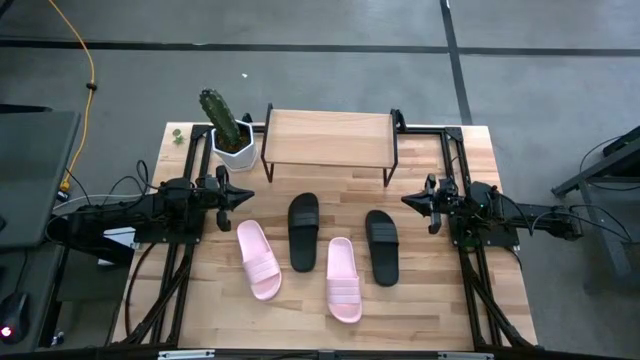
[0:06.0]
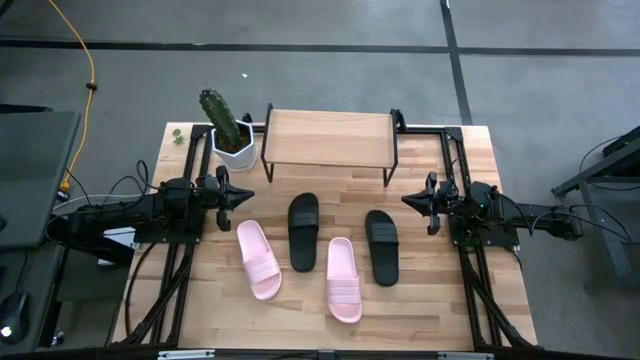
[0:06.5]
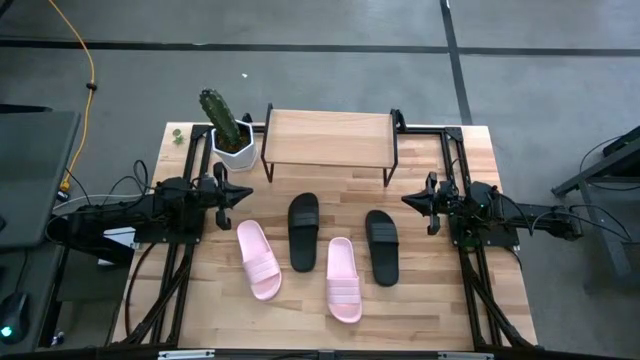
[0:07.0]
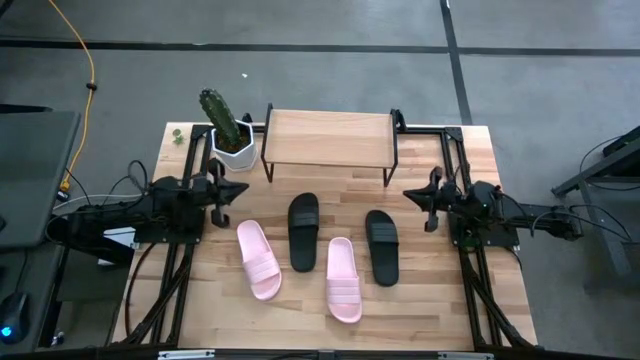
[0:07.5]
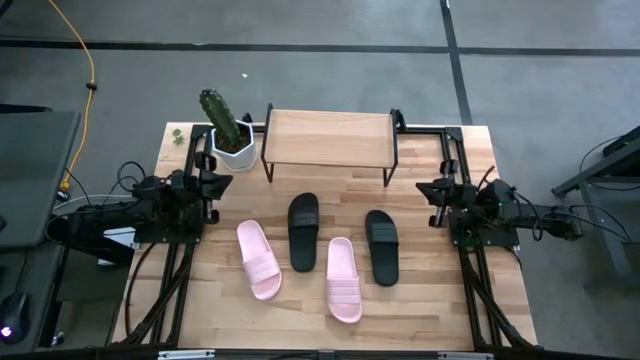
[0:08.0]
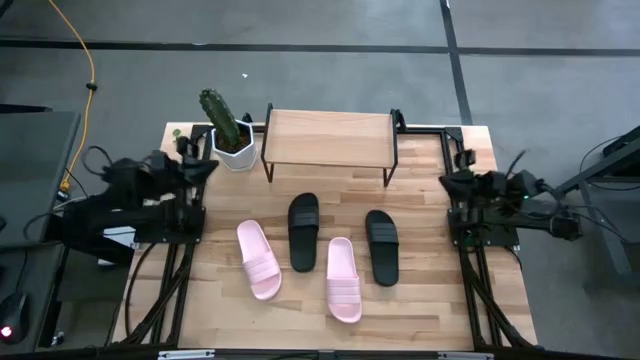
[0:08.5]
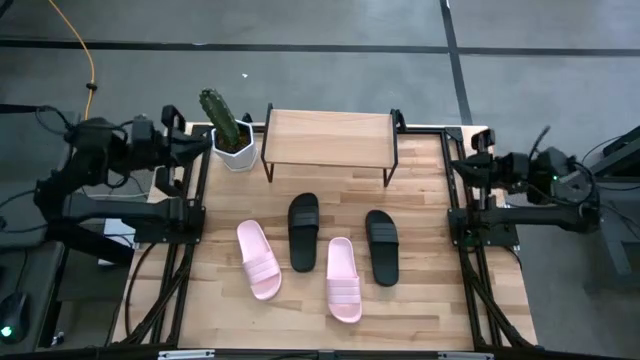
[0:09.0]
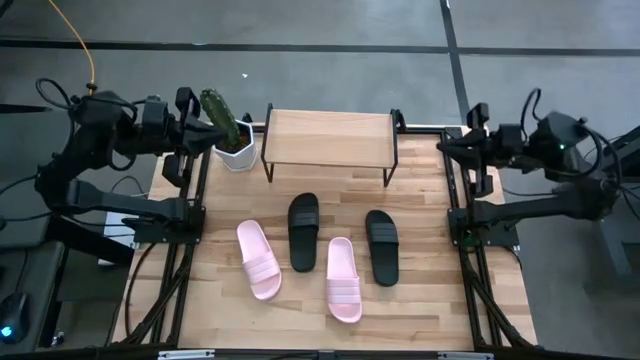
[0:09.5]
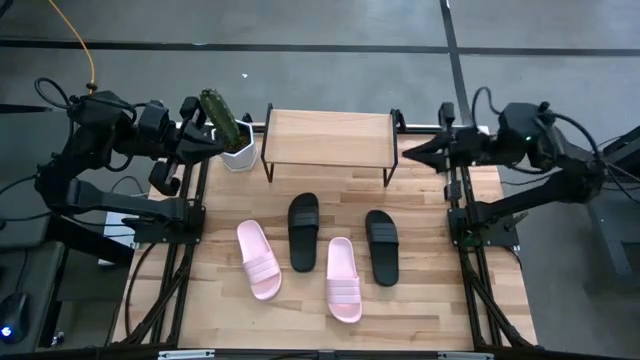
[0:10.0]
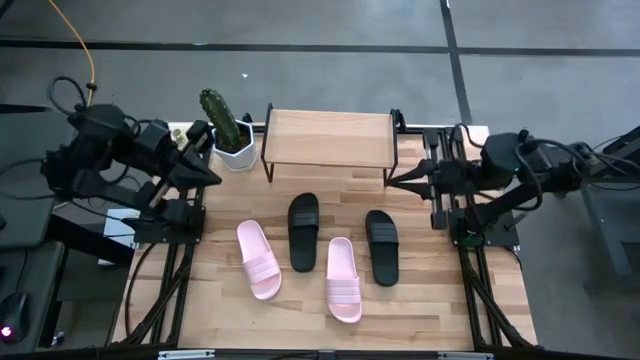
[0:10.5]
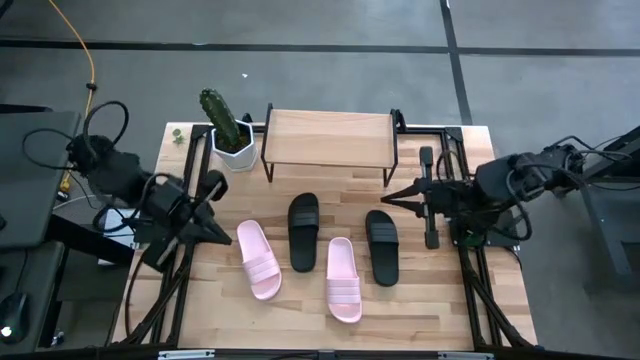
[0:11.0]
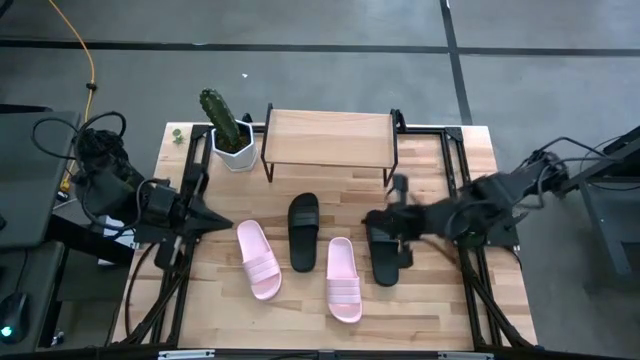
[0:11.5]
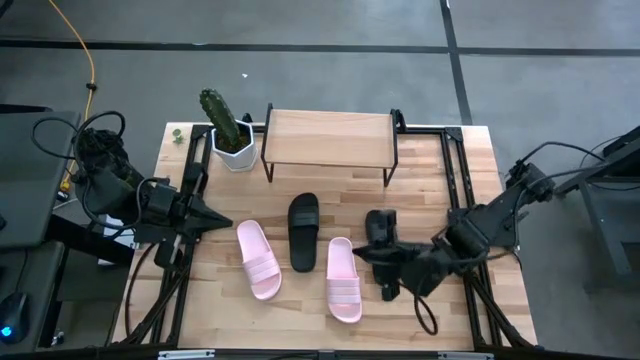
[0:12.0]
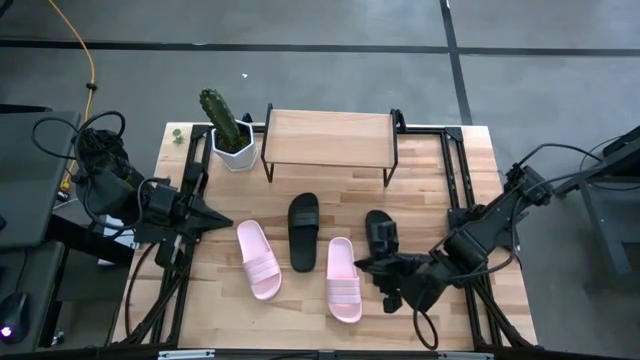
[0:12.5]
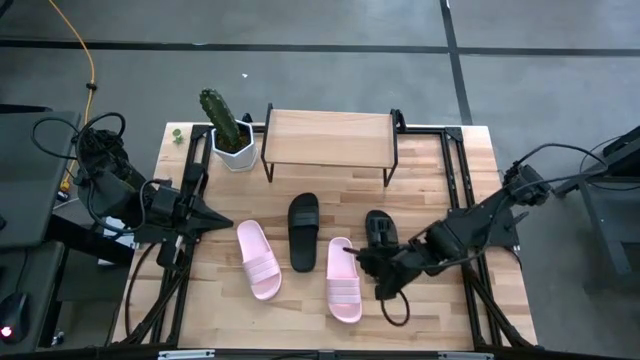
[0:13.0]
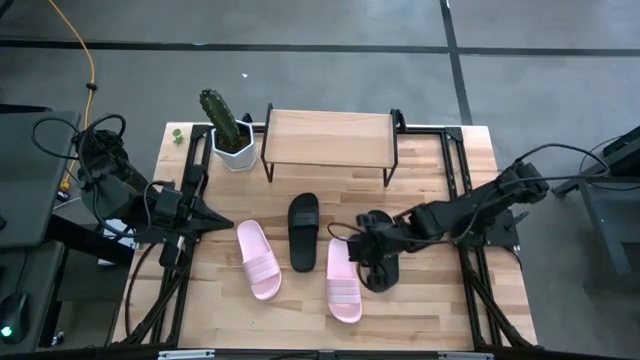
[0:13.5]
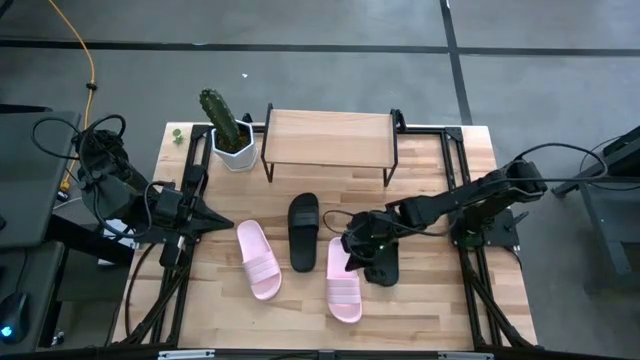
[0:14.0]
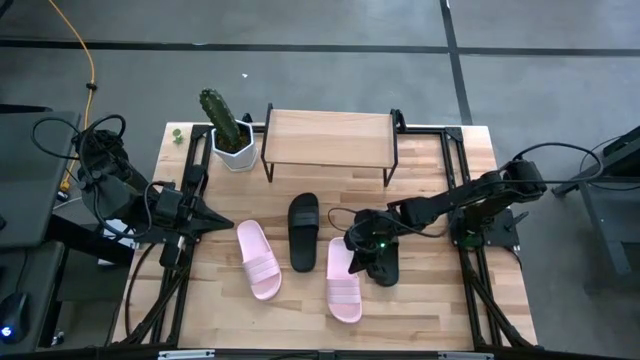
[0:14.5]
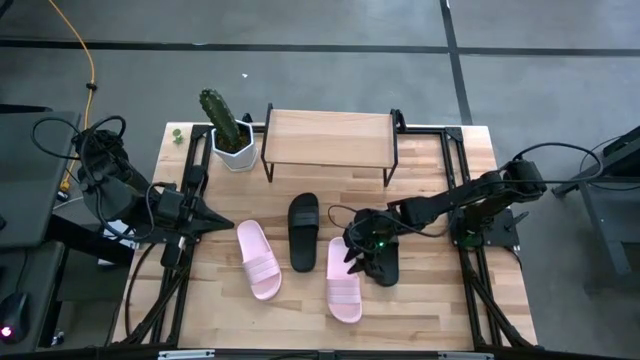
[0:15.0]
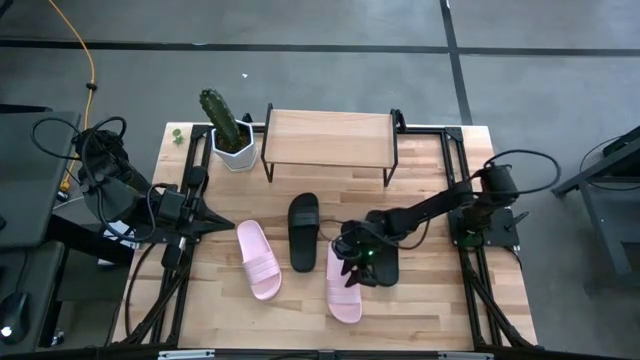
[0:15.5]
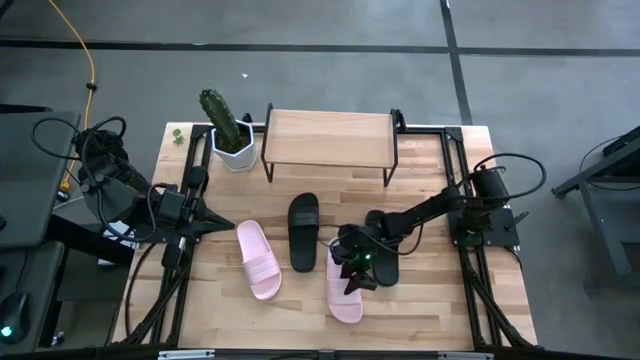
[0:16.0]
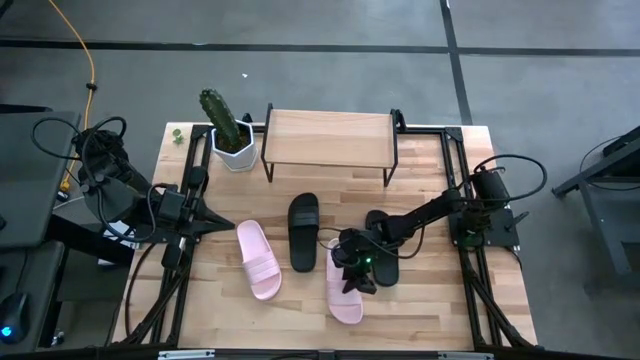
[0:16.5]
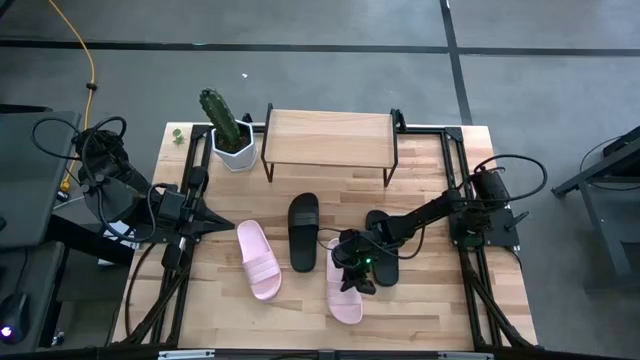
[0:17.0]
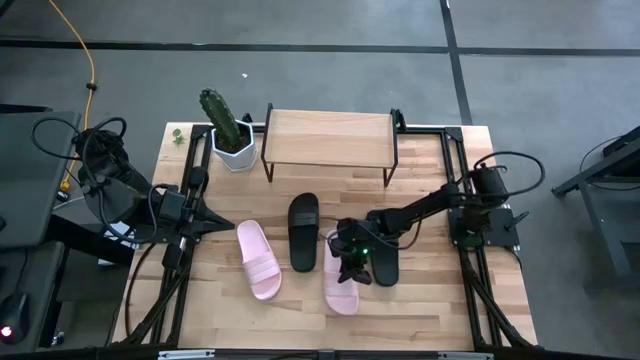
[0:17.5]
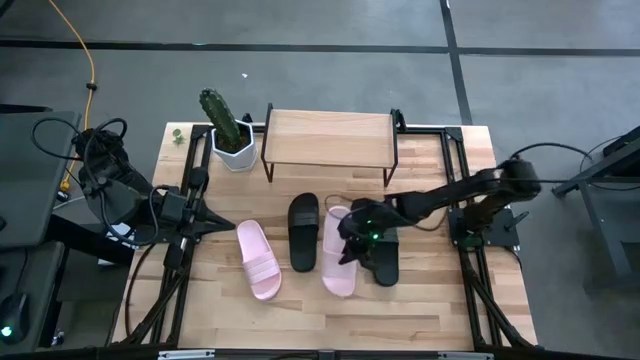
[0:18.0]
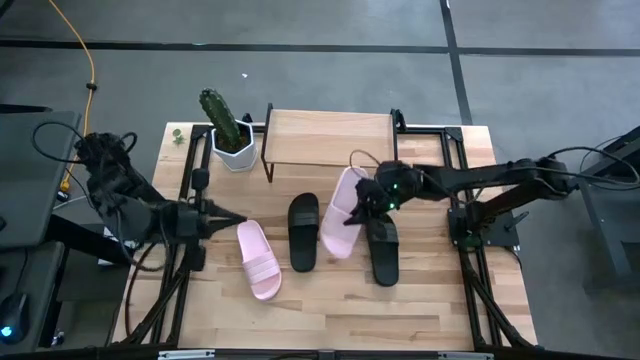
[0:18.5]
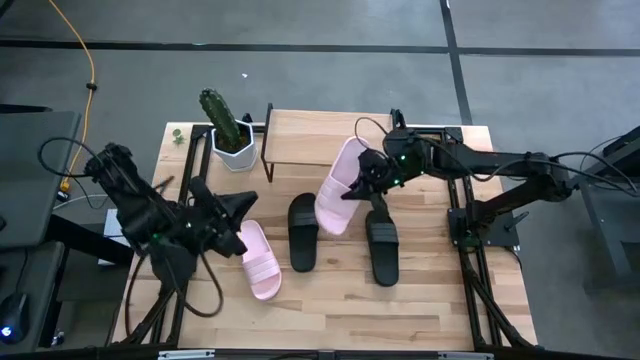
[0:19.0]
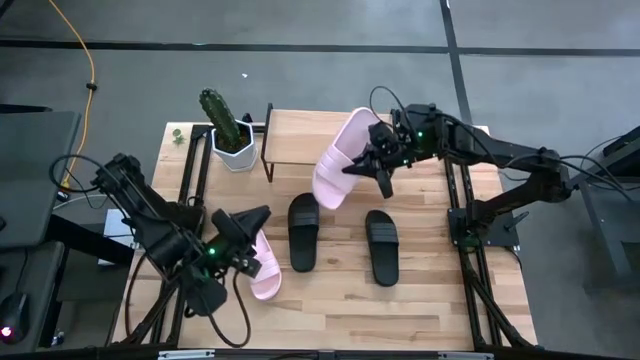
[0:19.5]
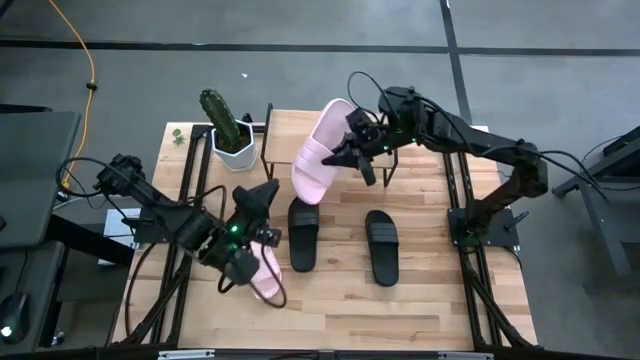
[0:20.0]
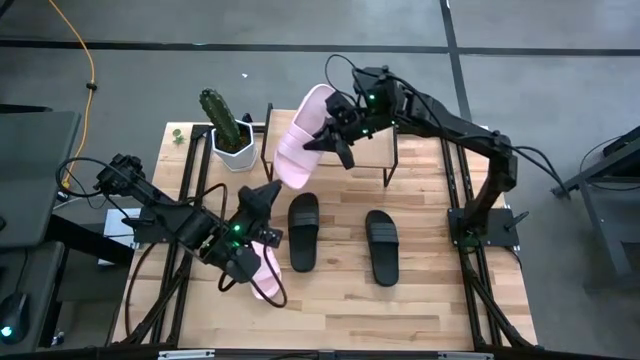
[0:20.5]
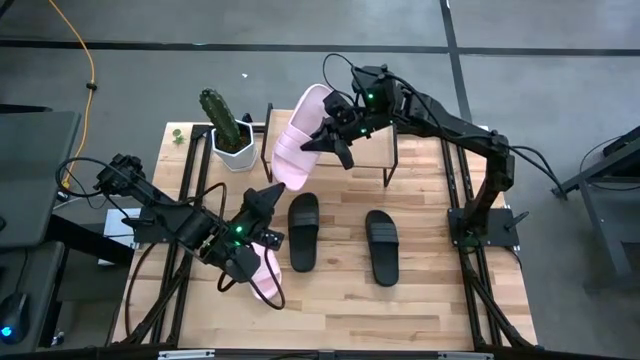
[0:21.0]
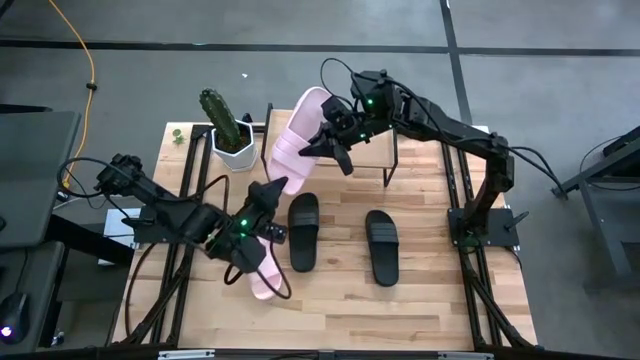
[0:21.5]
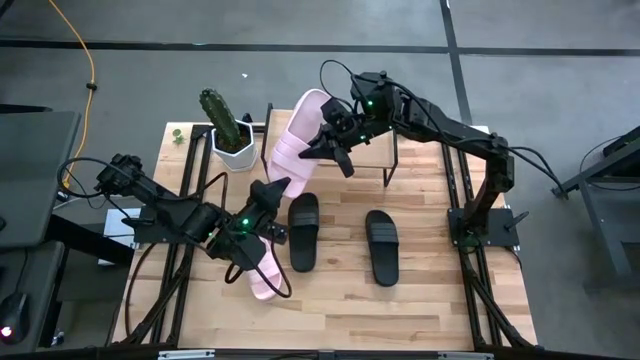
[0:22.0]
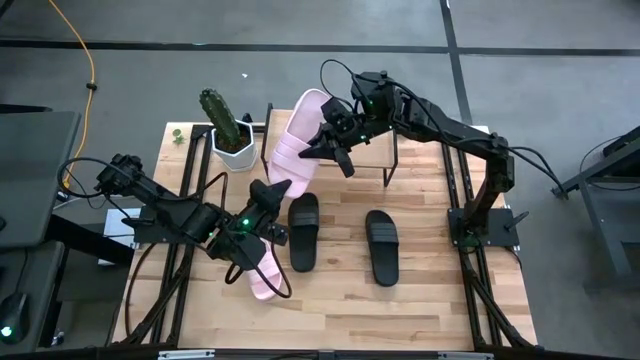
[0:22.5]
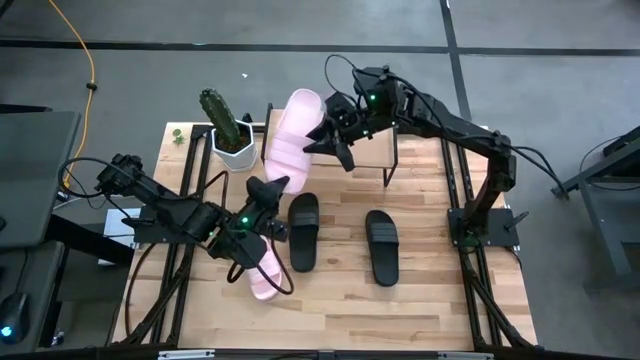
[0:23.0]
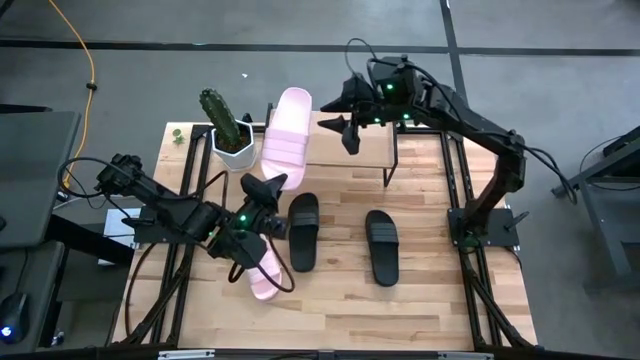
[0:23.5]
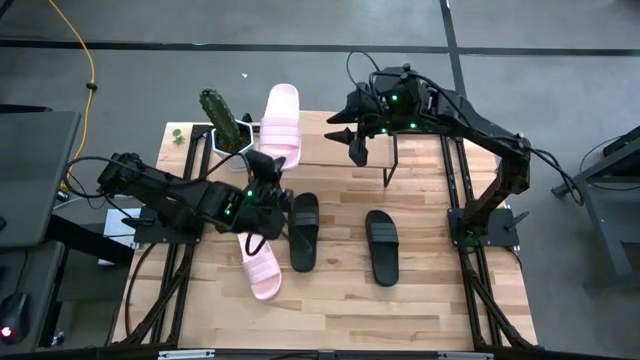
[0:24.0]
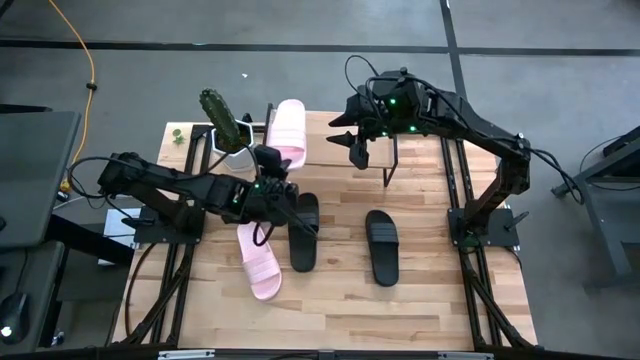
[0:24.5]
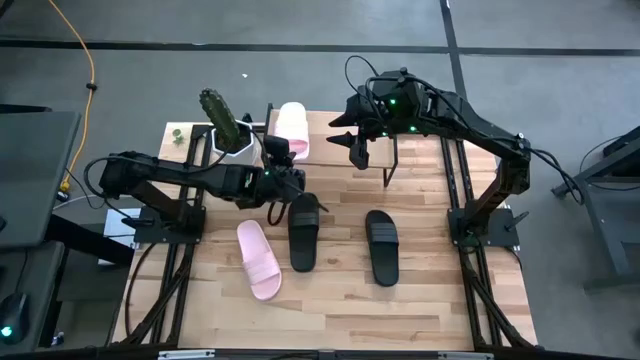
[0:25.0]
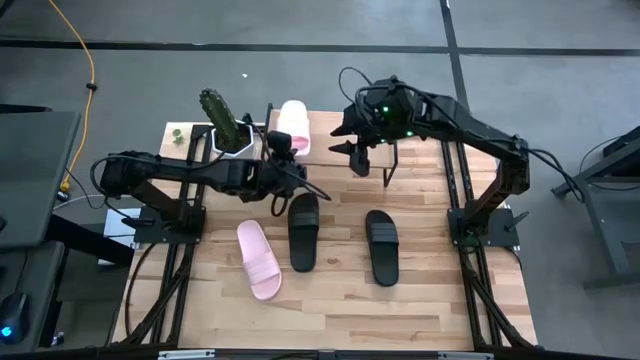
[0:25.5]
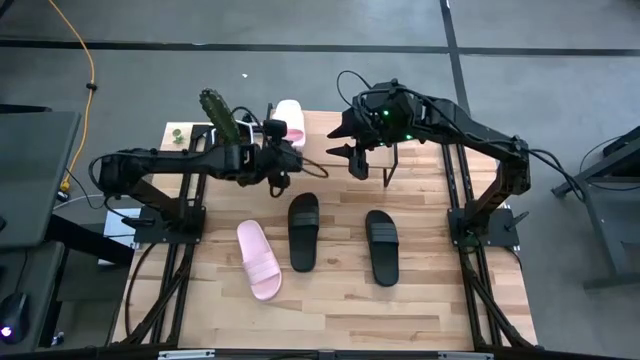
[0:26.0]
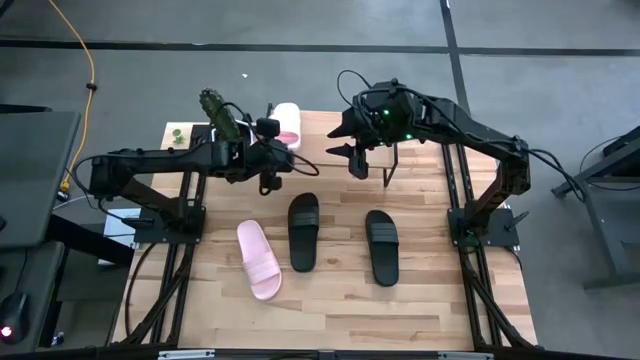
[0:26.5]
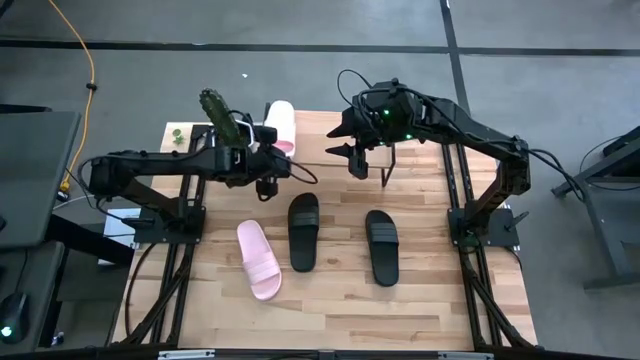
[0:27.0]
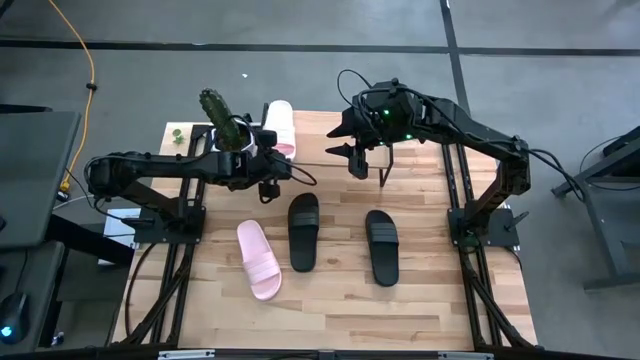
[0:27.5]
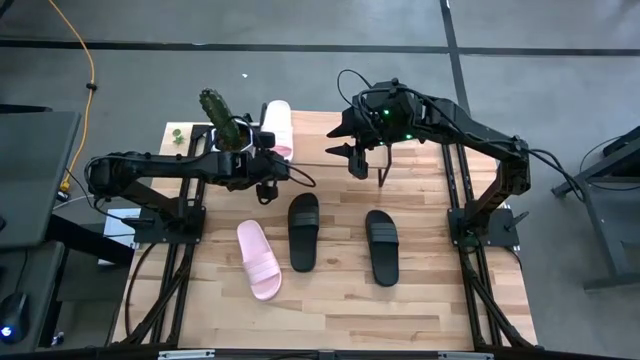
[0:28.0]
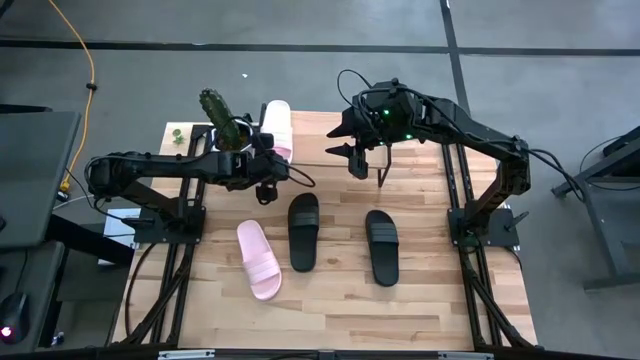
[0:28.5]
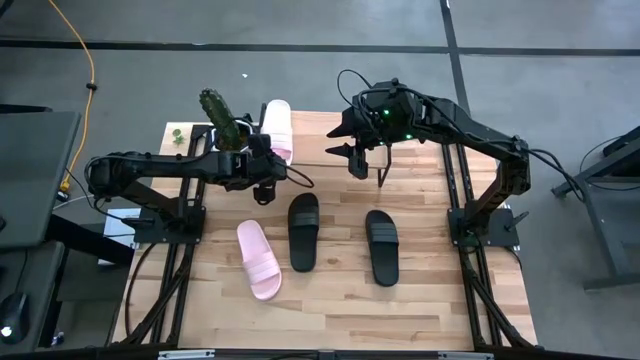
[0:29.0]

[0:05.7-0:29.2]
Task: Pick and place slides into the shelf
Put the right pink slipper on the shelf
